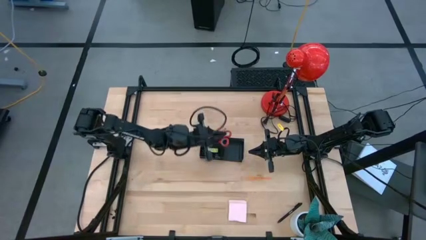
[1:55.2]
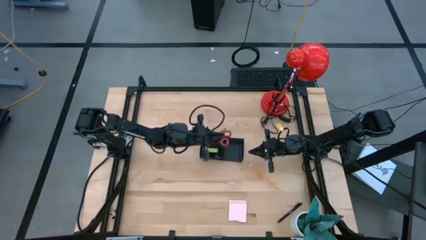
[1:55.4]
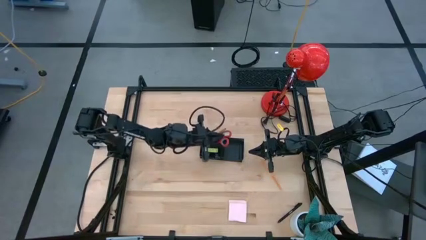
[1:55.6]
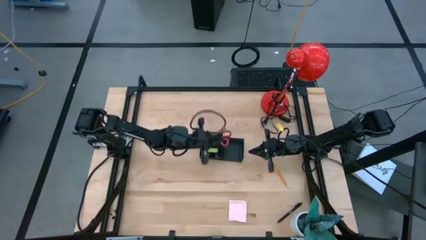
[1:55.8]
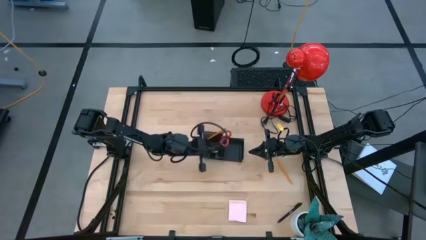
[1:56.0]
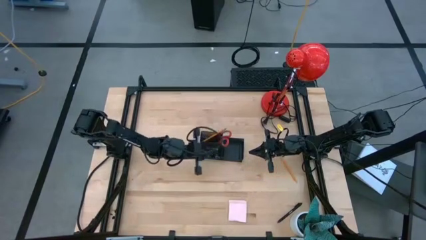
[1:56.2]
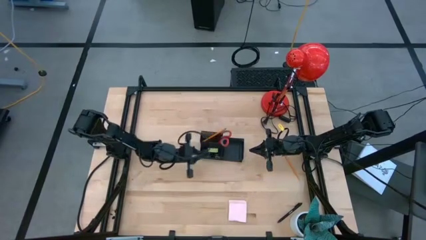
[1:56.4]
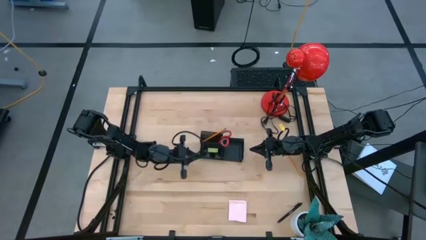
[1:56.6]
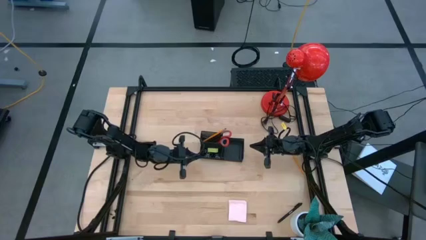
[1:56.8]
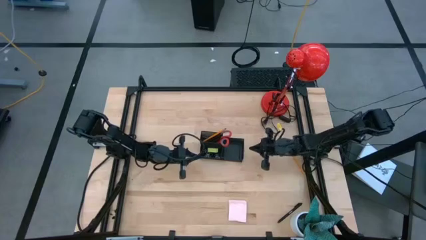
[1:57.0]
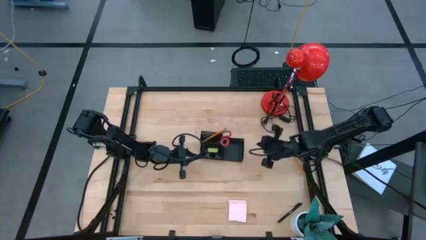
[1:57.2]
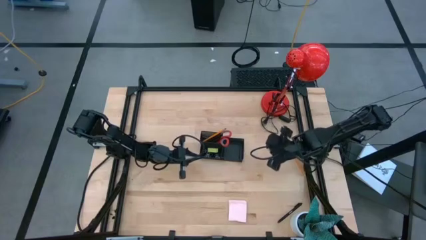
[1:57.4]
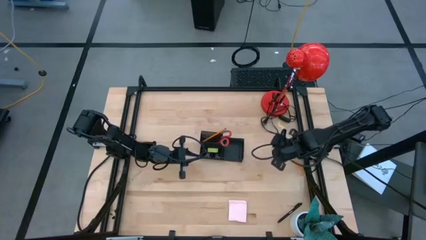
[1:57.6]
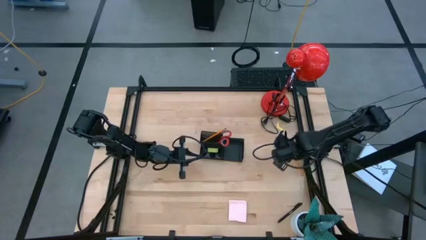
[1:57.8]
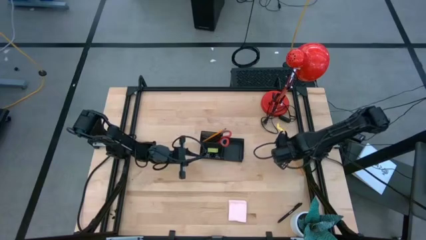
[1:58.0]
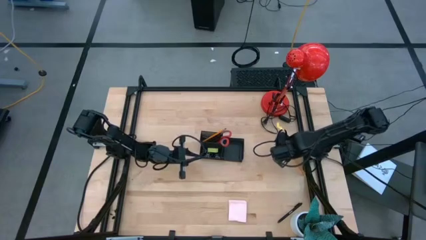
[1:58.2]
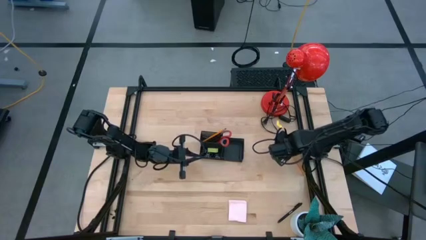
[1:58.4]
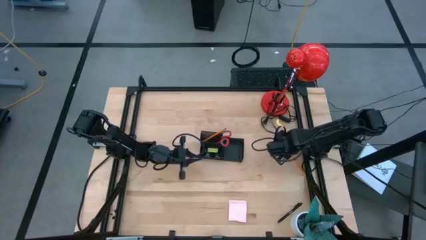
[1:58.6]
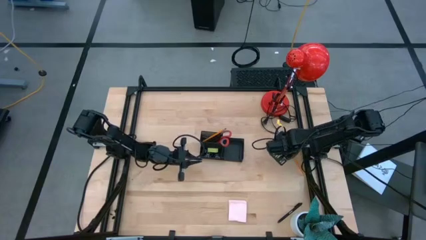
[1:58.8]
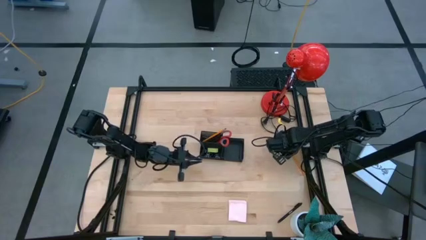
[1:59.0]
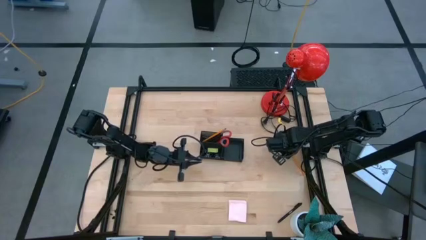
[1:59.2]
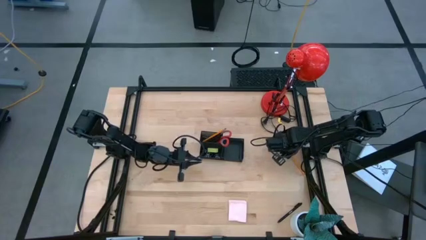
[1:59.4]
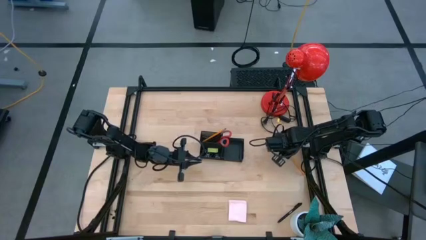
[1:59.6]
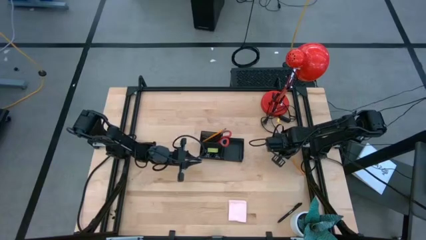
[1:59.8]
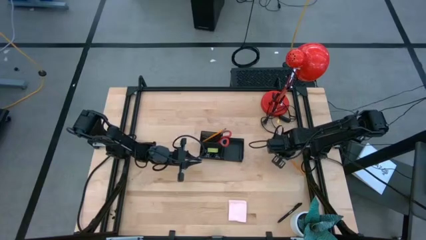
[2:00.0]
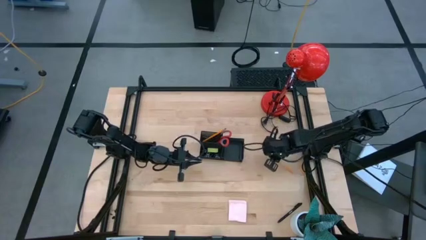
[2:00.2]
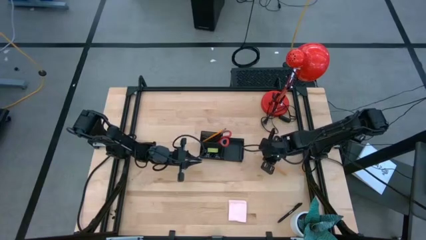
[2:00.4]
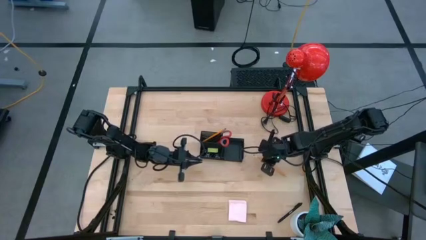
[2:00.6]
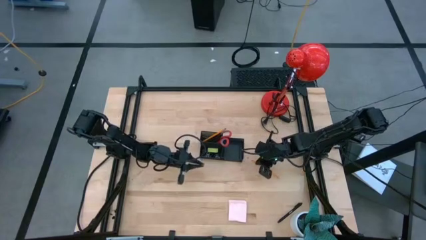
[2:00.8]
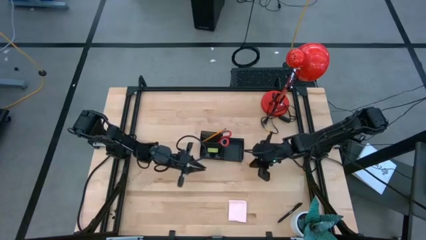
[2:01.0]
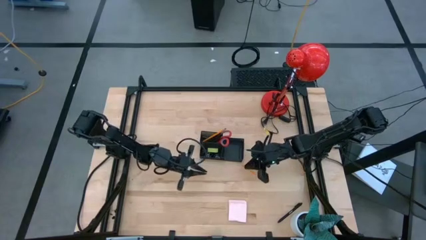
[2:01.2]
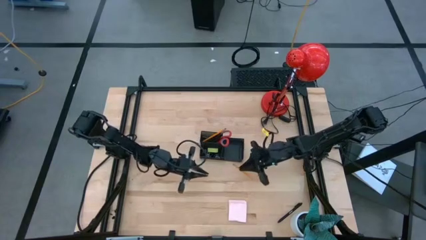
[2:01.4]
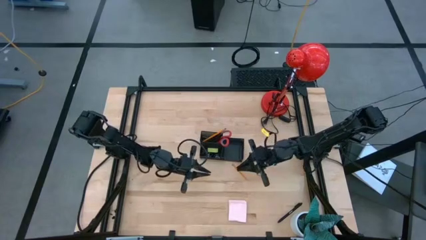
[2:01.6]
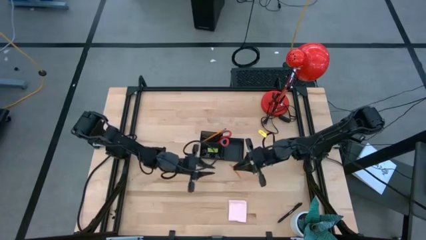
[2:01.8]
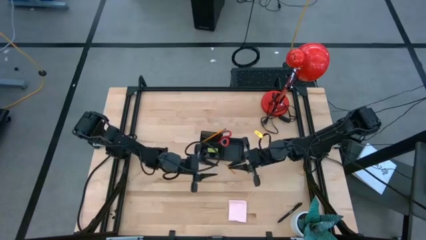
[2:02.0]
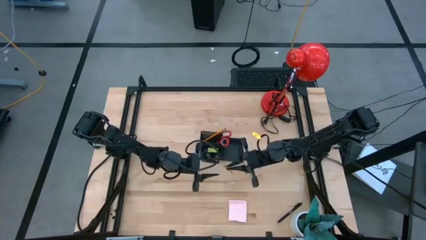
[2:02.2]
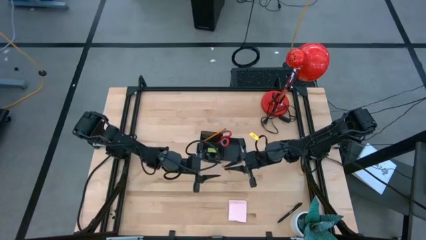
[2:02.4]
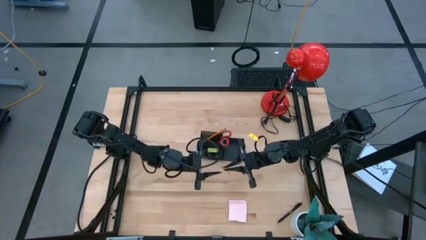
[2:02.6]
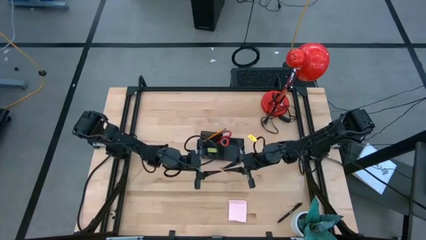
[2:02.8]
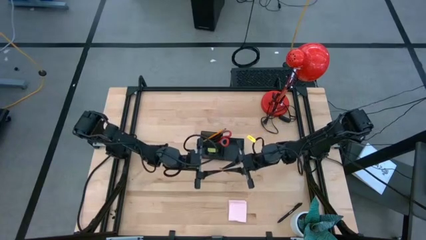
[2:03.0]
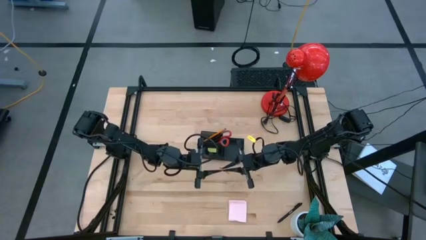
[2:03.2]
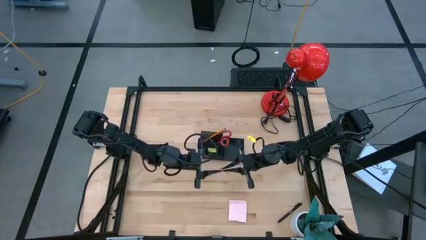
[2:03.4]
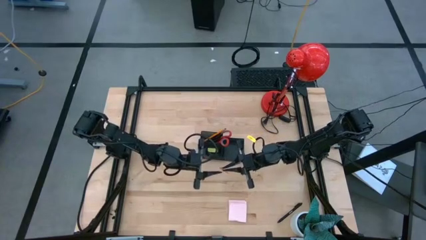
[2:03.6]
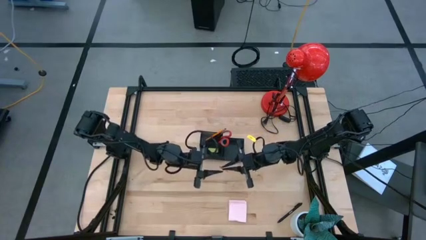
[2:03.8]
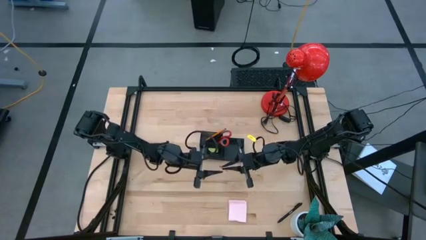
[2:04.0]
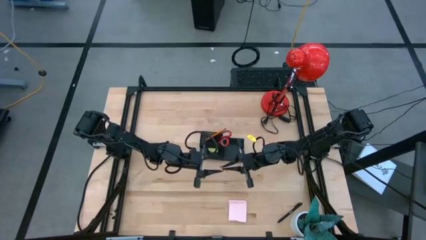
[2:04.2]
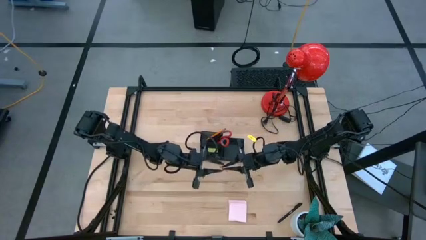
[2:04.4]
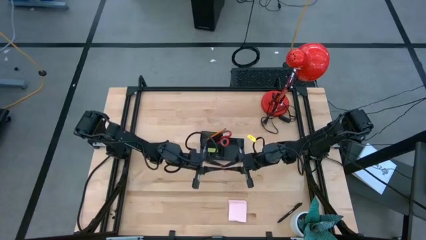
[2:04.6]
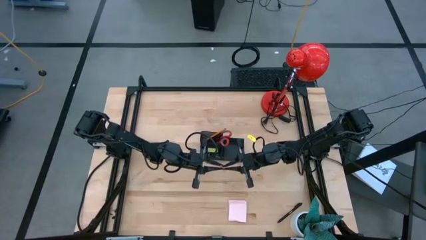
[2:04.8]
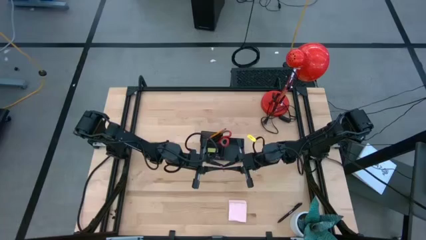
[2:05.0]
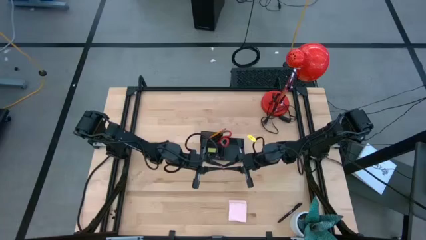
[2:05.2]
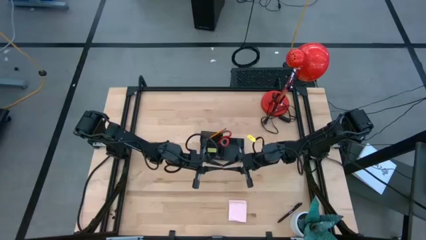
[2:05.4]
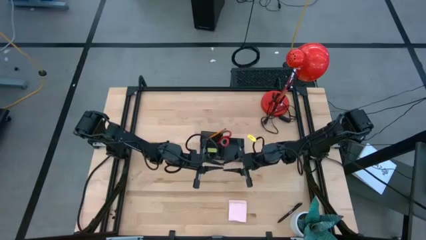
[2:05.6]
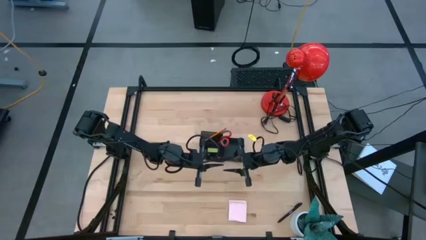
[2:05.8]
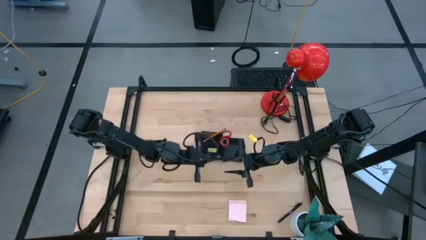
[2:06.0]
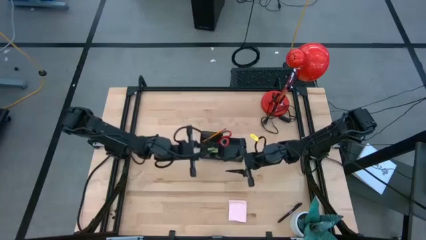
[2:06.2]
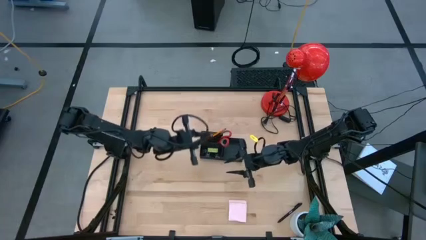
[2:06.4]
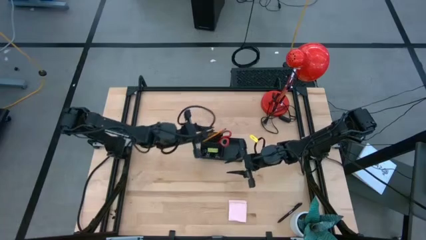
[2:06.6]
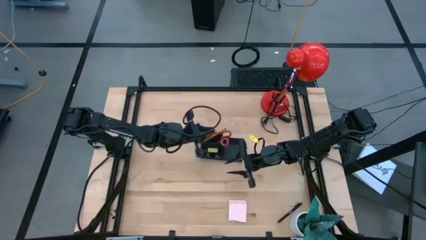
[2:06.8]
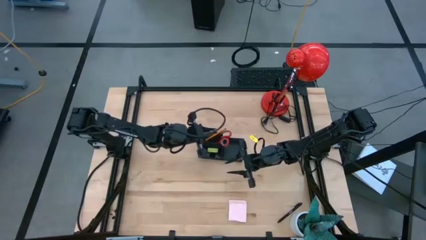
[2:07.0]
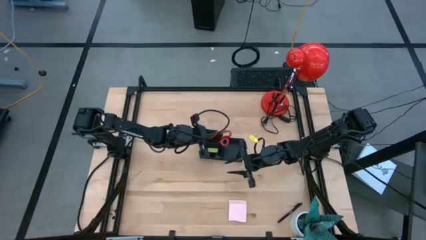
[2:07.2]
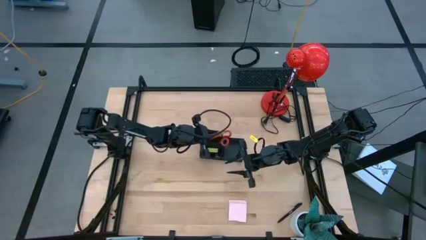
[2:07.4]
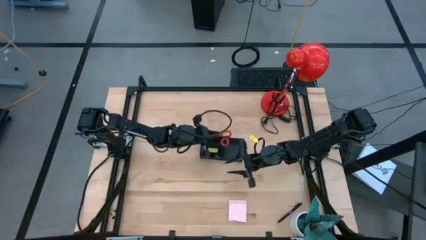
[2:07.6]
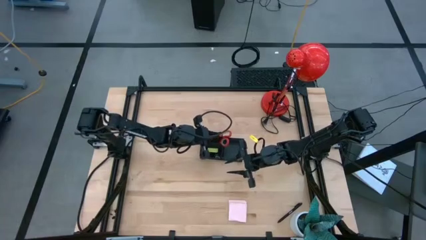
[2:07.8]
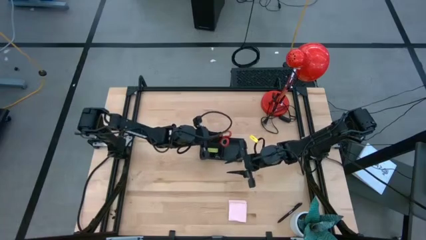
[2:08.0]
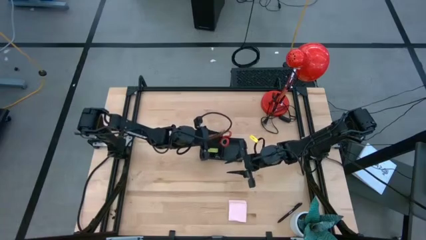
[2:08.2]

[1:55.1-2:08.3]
Task: Pick and place office supplies into organizer
Put the yellow pencil into the black desk organizer

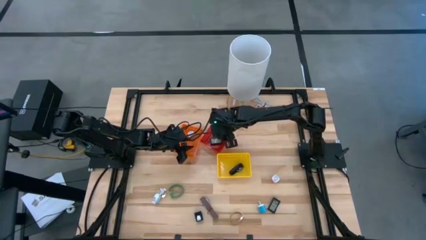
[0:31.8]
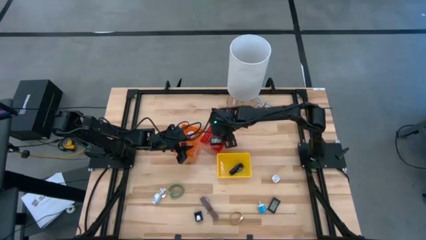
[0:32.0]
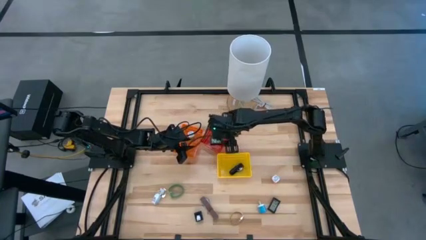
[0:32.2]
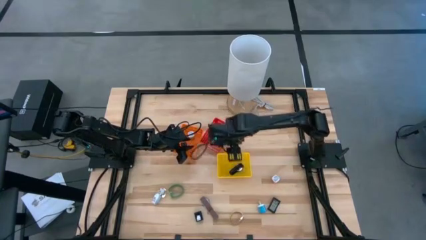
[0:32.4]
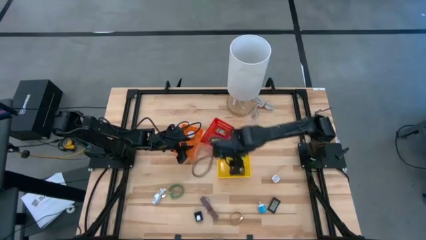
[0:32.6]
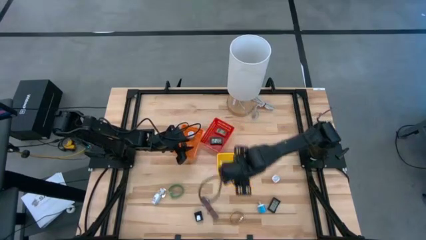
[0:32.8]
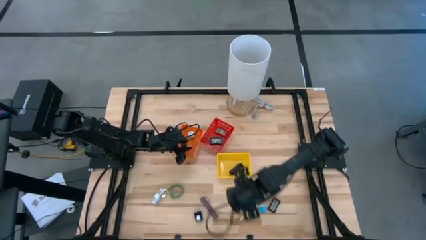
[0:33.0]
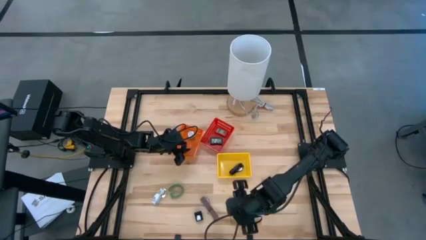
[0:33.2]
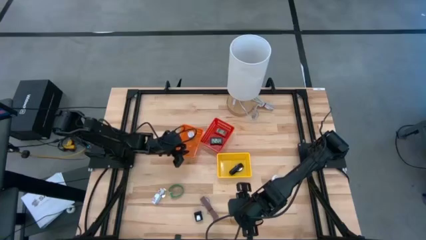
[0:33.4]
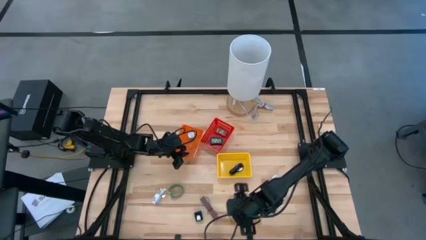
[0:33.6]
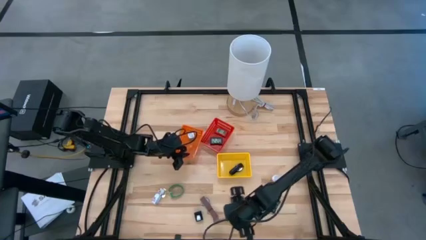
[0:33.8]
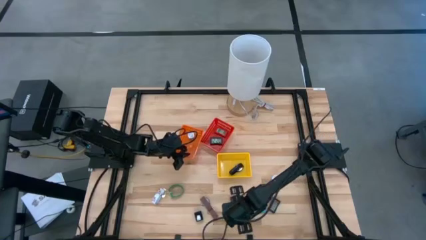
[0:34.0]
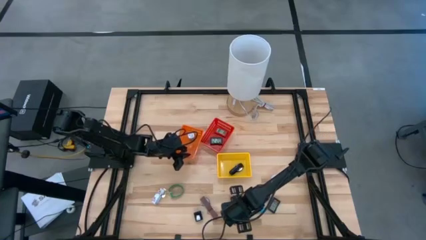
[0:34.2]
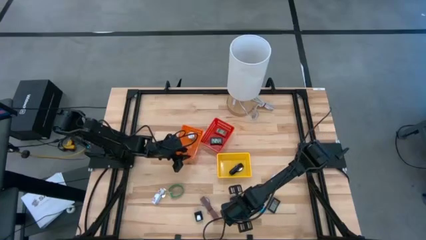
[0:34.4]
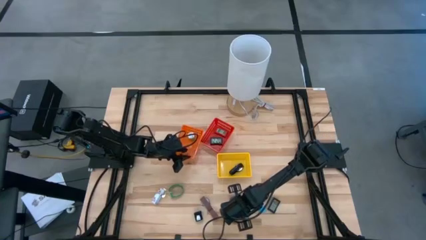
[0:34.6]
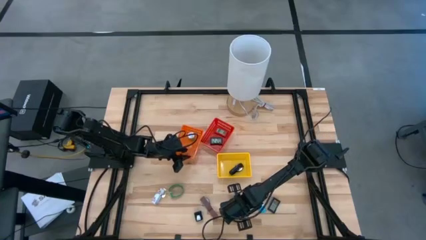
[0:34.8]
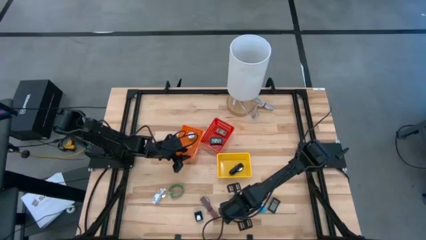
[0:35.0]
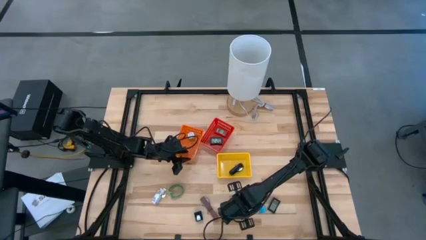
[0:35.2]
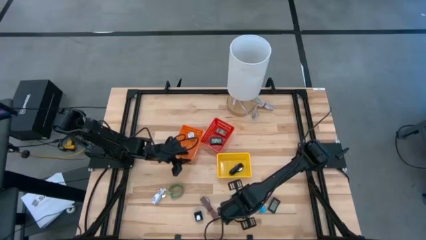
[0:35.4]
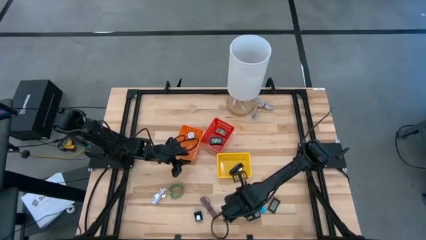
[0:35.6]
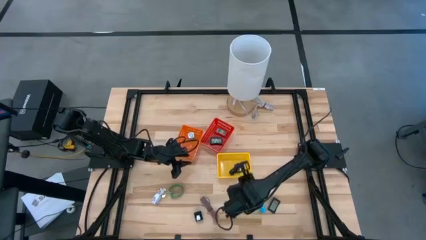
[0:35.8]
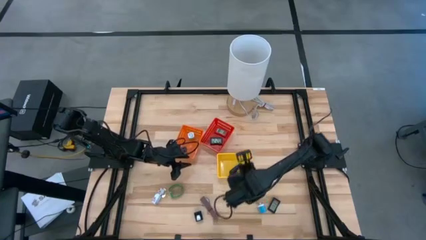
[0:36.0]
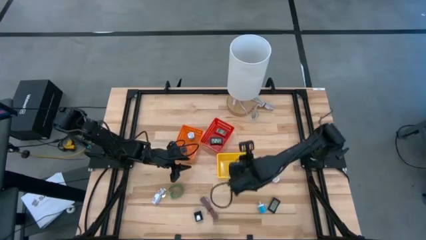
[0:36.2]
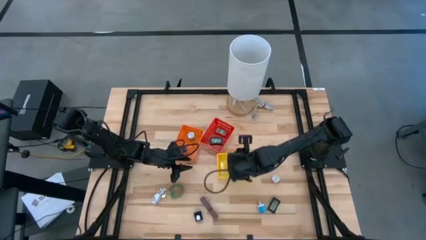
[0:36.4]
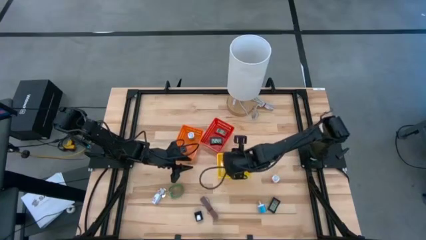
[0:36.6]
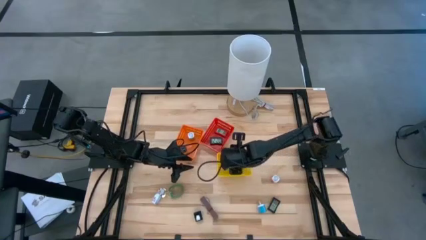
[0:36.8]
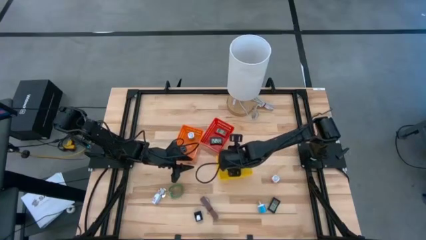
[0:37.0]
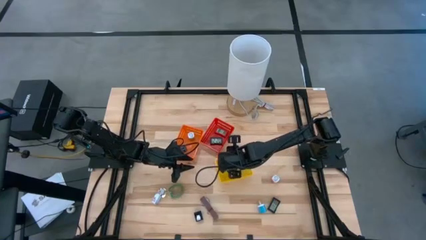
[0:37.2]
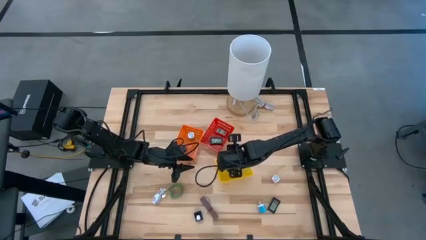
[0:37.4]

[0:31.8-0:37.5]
Task: Pick & Place Office items
Put the gold wrist watch into the yellow bin
